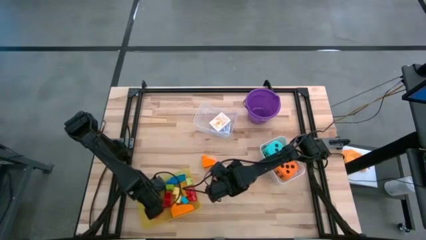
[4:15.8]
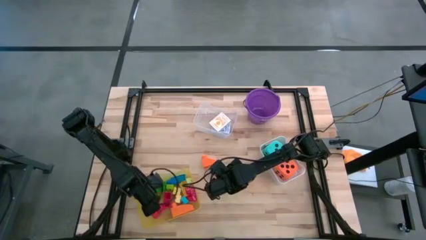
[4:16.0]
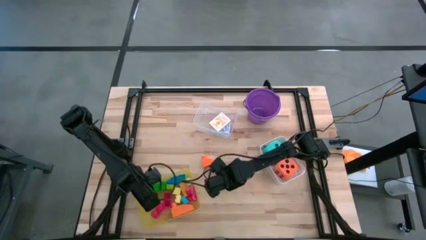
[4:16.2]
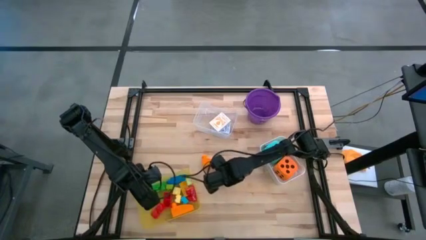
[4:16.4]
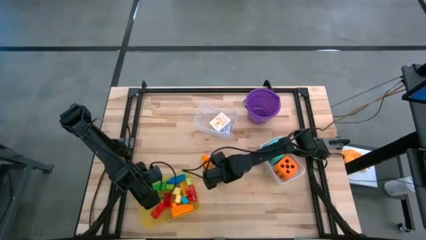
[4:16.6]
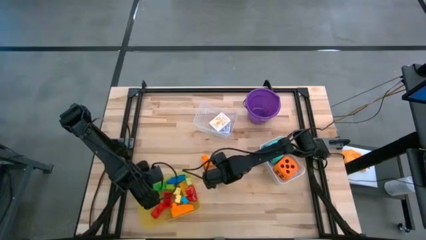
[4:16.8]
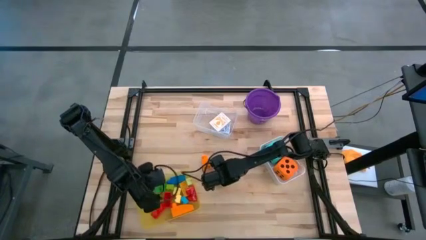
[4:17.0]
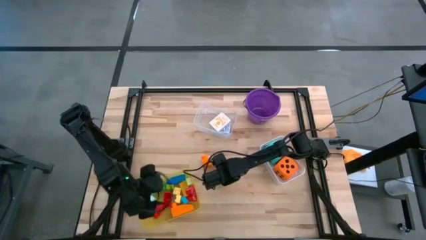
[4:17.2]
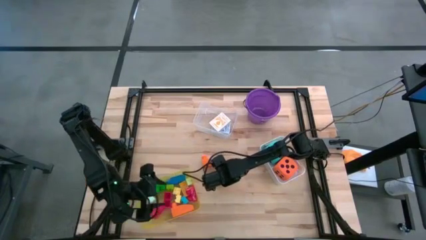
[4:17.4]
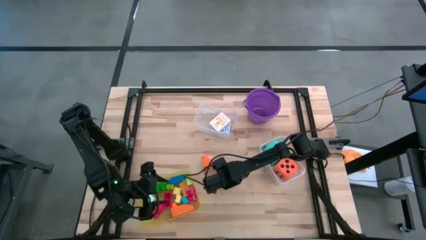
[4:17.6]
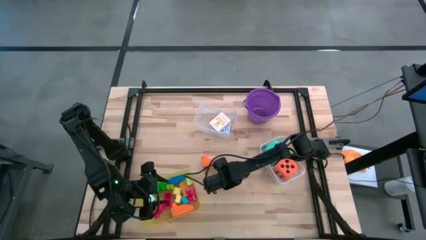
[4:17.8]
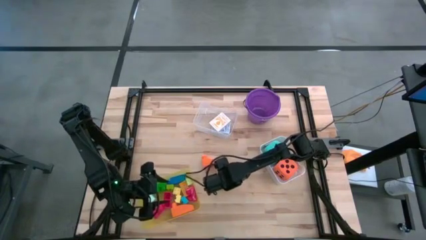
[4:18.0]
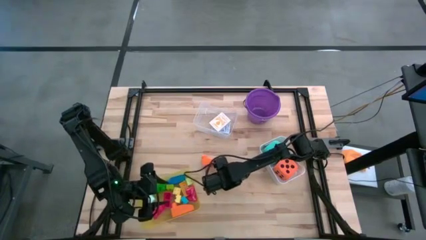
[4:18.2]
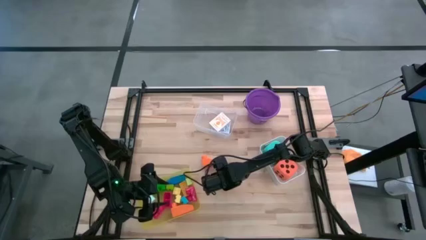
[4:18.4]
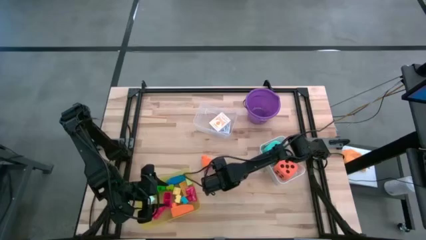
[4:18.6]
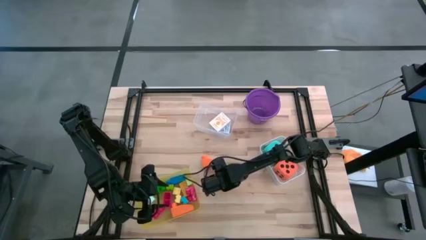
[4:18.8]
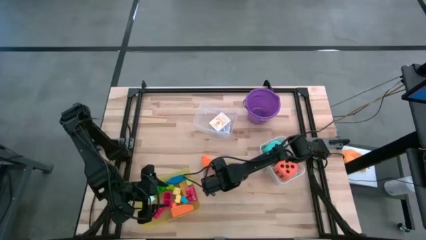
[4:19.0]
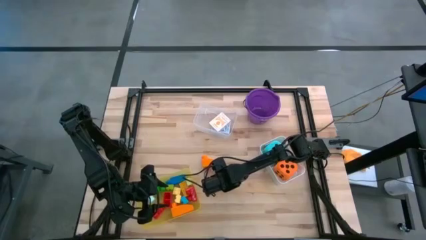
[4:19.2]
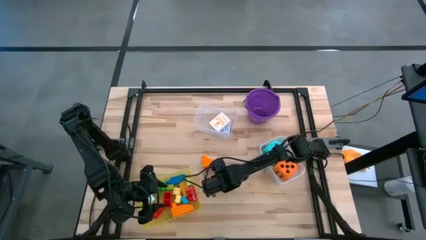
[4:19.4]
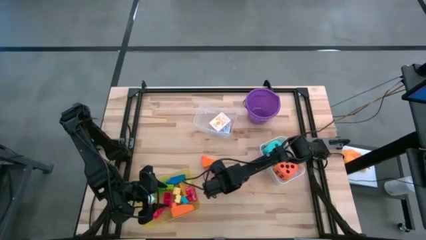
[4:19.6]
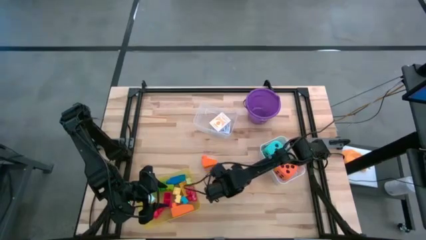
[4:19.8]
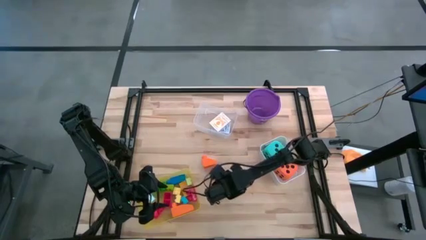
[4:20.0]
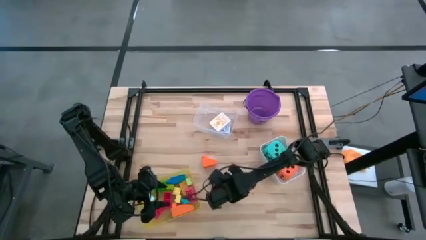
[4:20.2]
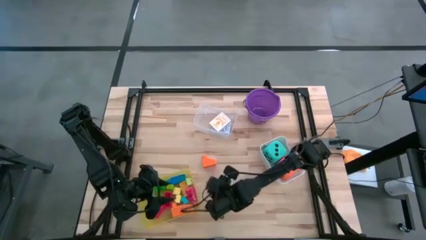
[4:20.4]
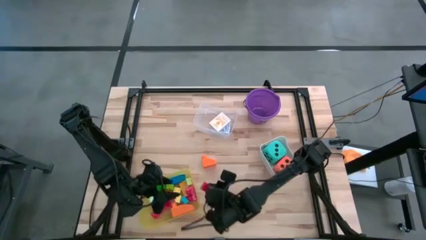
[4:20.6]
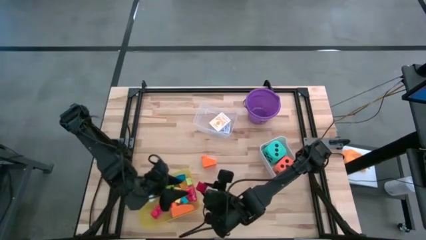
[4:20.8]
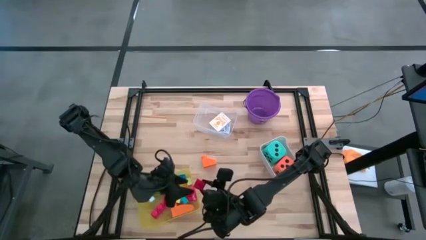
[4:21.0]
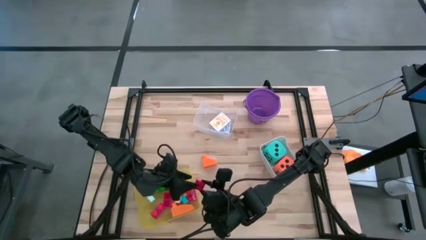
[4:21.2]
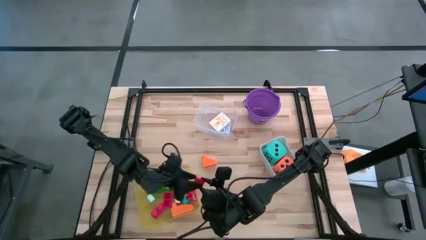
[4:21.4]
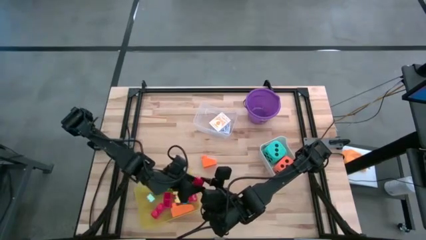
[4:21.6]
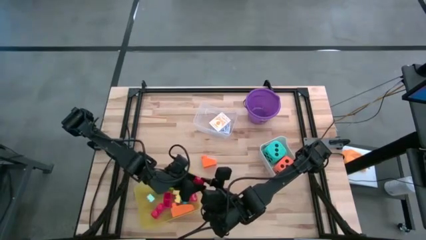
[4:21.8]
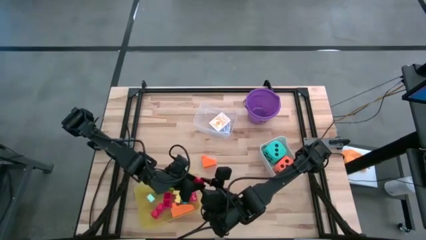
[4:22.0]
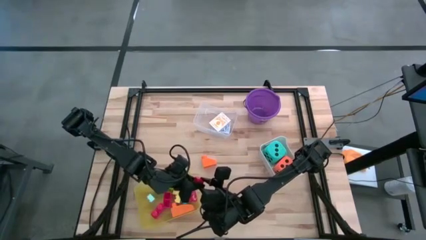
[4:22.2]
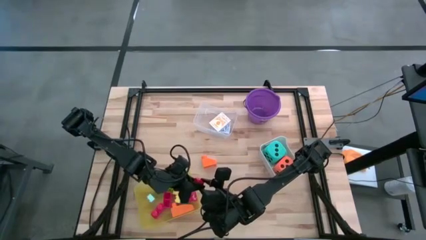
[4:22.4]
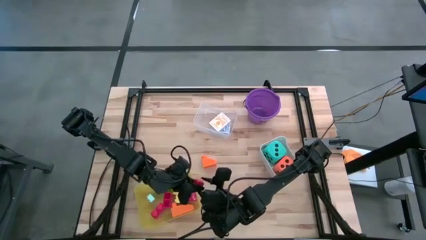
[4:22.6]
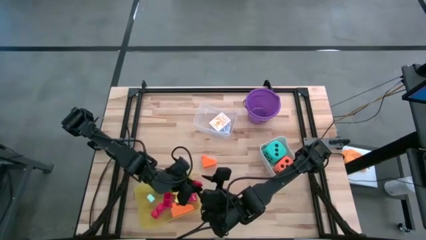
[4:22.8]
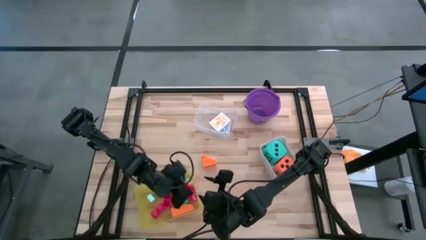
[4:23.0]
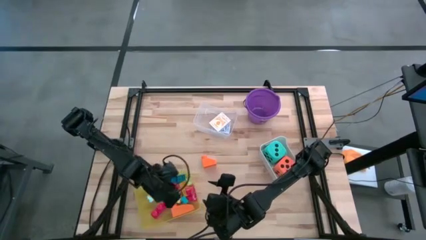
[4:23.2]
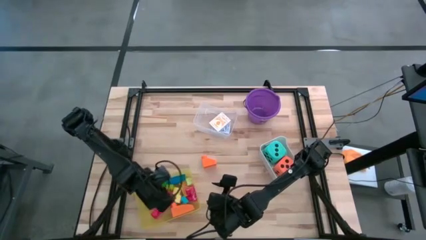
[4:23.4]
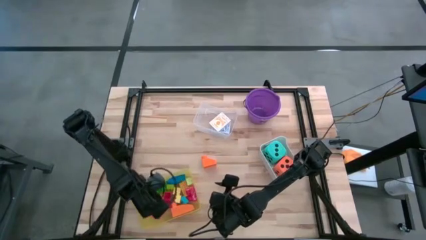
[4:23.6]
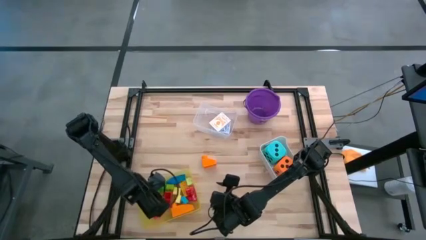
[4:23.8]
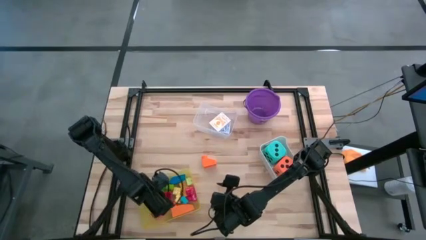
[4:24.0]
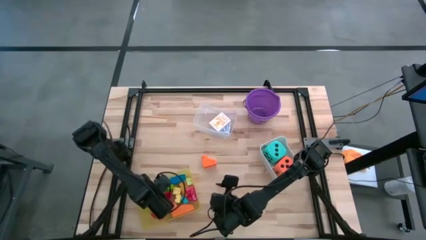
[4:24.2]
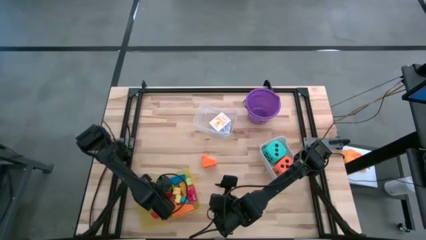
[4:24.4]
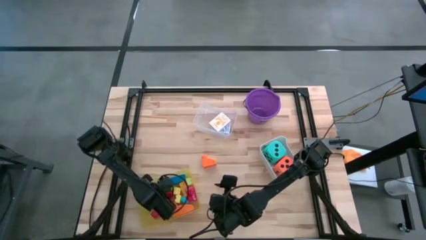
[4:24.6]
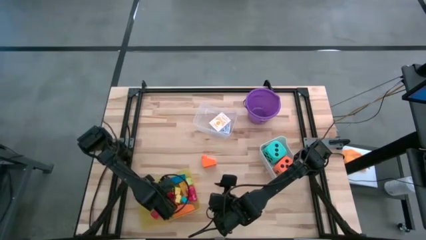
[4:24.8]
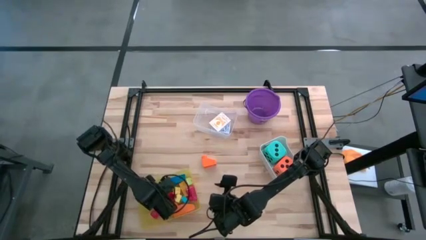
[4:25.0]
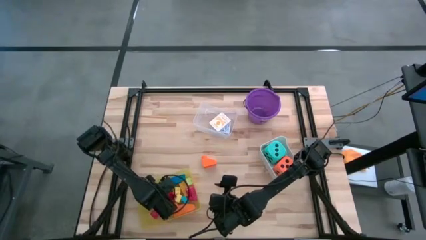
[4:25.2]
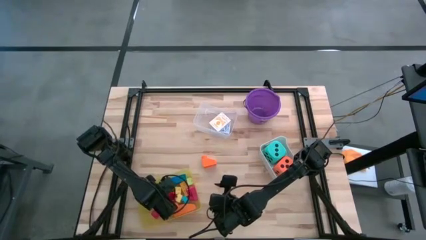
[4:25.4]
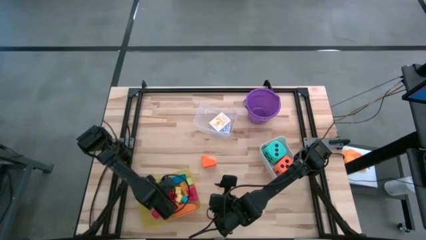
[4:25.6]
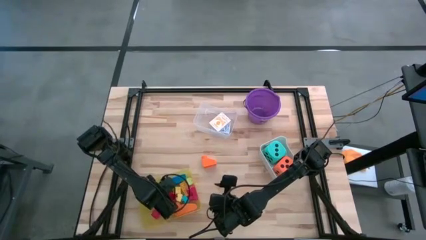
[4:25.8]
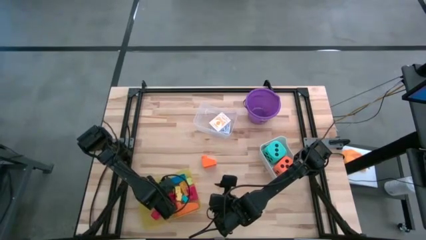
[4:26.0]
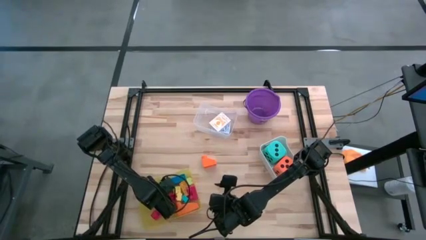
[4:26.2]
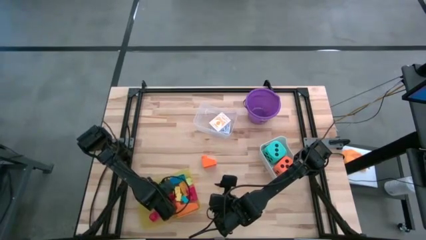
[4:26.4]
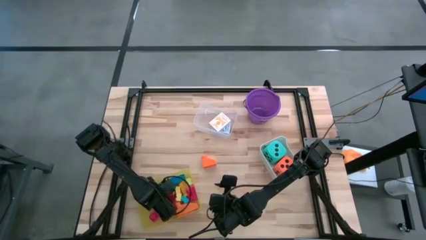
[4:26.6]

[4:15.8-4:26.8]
Task: Pick & Place Toys
Put the red game piece into the yellow bin
